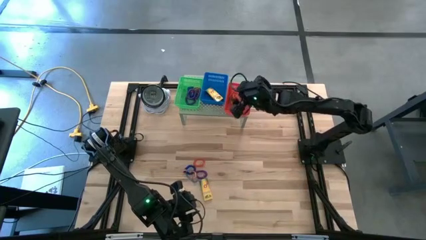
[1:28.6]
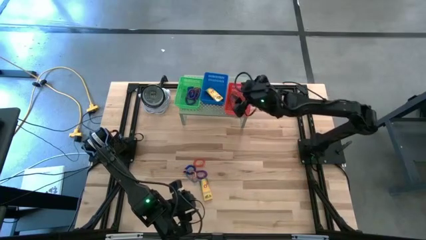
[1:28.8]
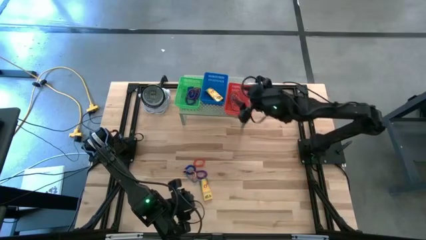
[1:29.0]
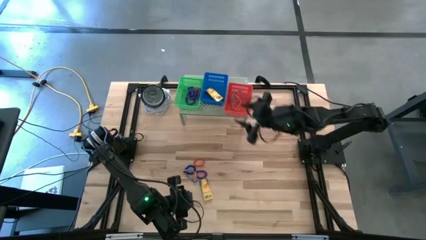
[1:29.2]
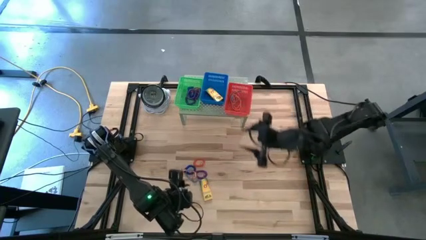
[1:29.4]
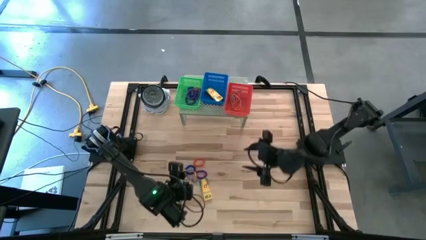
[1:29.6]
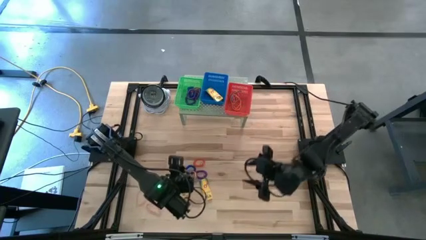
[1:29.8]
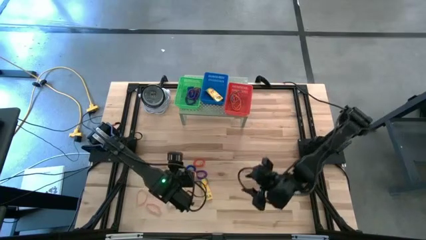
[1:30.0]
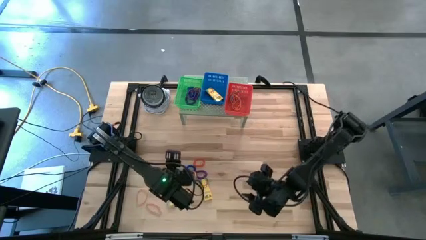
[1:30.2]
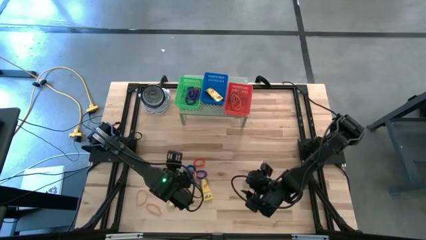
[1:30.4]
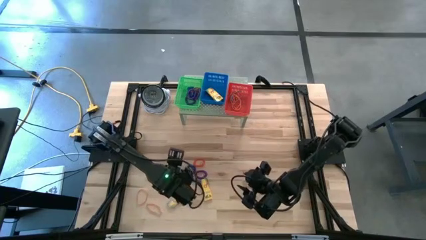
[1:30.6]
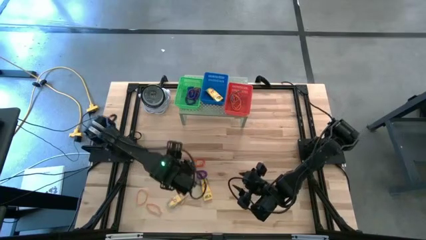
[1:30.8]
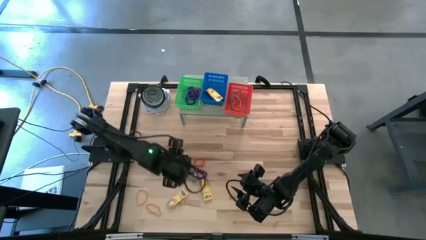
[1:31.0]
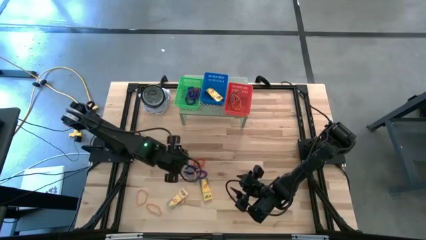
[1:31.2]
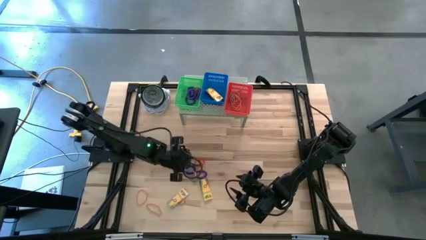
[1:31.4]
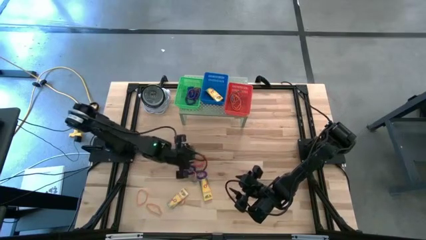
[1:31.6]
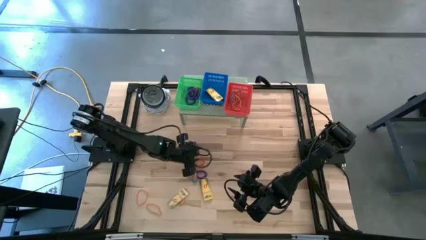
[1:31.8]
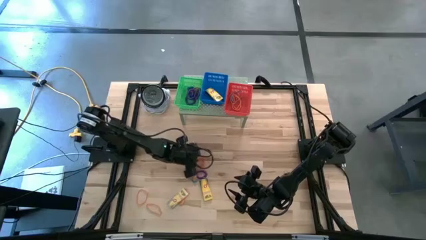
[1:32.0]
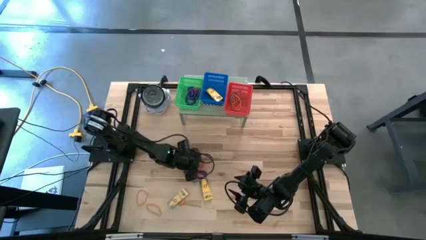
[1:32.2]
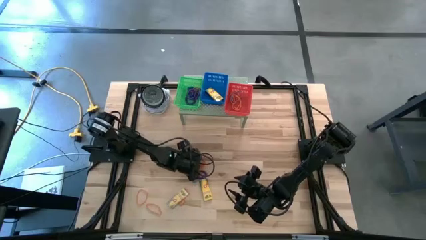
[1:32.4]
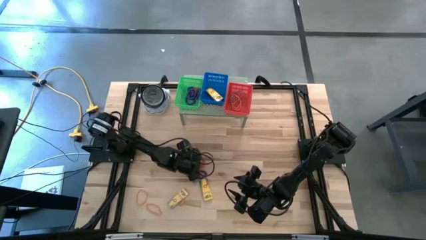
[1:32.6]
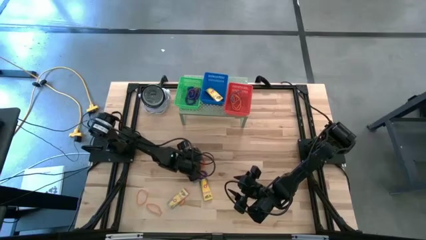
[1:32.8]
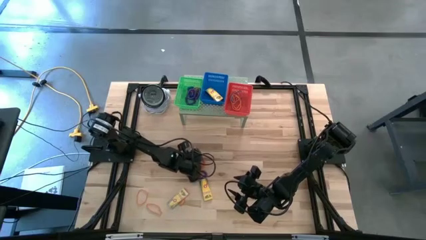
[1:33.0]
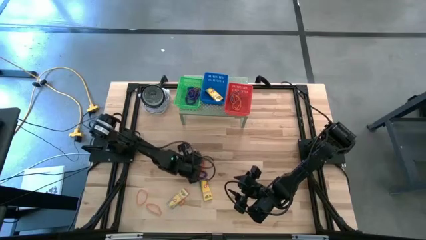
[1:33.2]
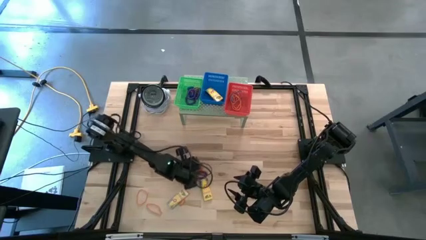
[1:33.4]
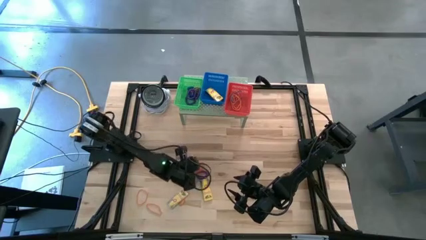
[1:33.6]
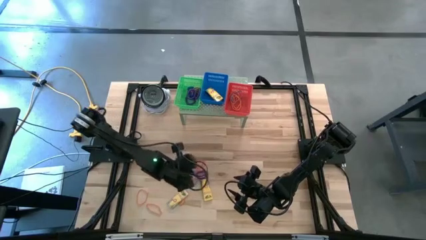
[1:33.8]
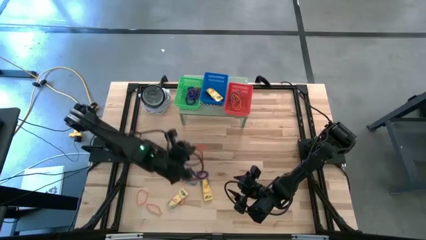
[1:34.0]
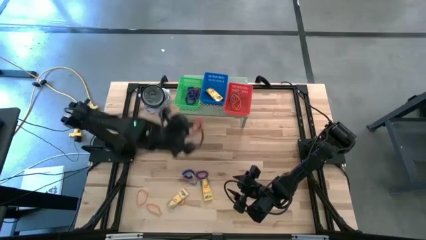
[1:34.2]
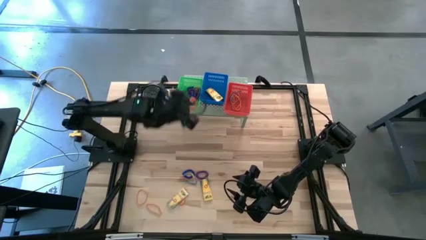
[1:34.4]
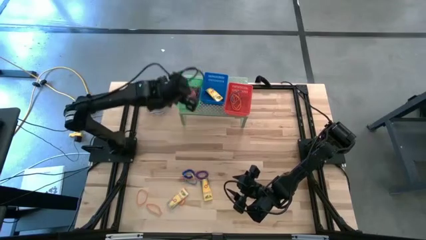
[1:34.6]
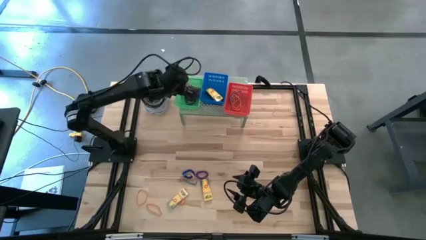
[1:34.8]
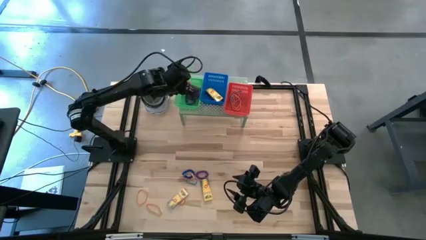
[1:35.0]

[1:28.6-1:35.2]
Task: Pick & Place Office Desk Supplies
Put the orange spring keychain into the green bin on the shelf

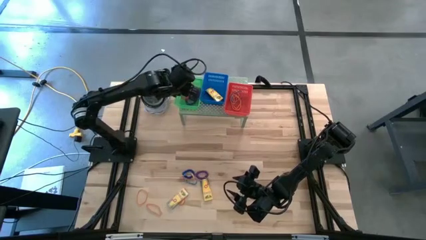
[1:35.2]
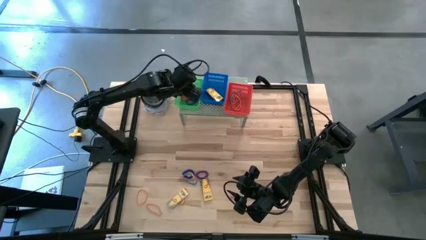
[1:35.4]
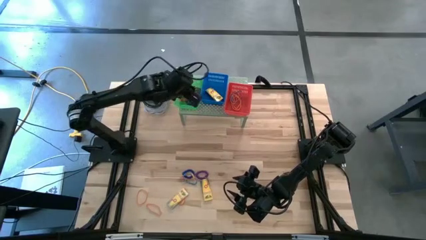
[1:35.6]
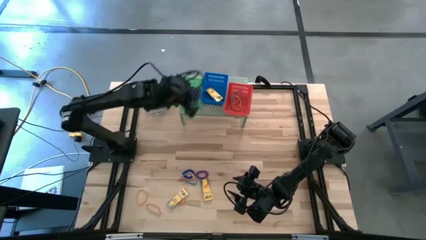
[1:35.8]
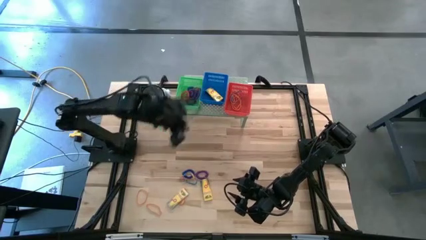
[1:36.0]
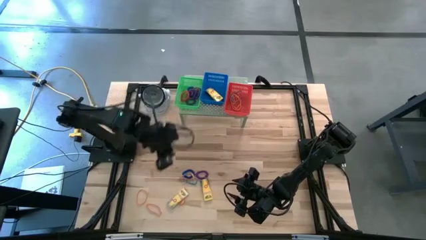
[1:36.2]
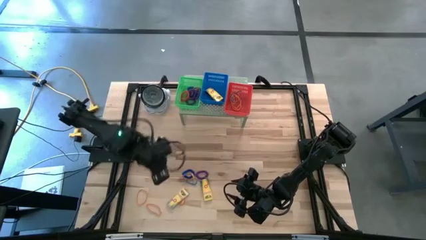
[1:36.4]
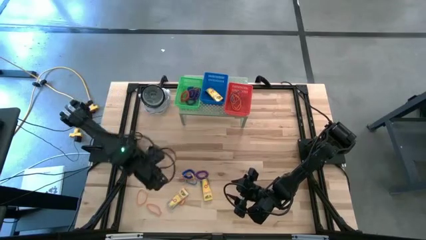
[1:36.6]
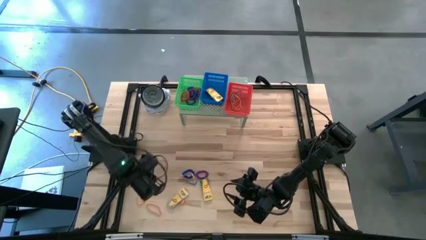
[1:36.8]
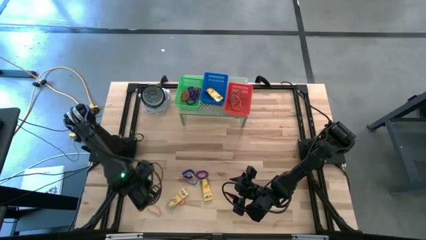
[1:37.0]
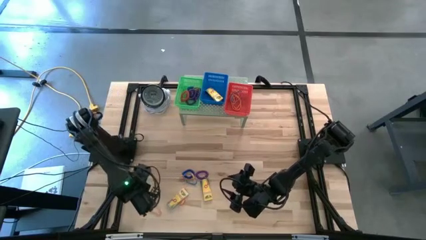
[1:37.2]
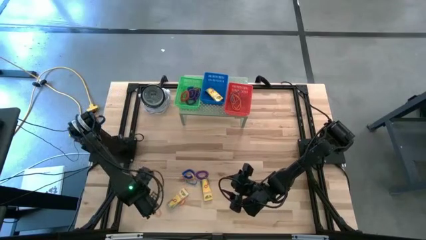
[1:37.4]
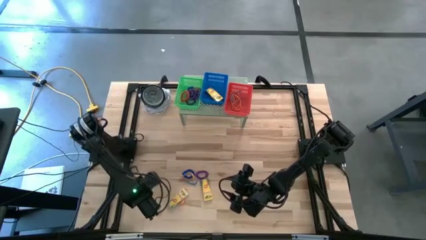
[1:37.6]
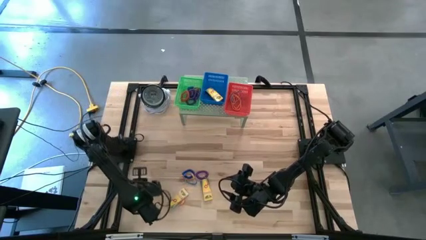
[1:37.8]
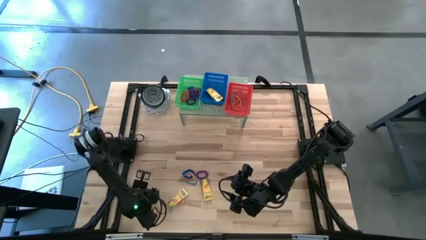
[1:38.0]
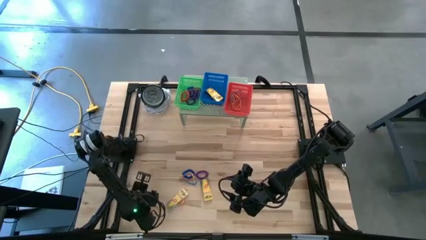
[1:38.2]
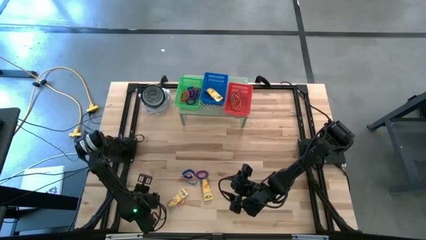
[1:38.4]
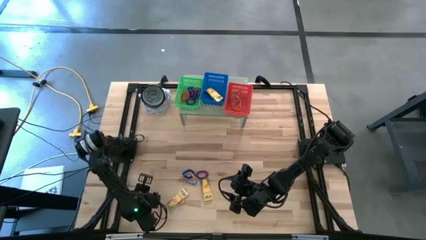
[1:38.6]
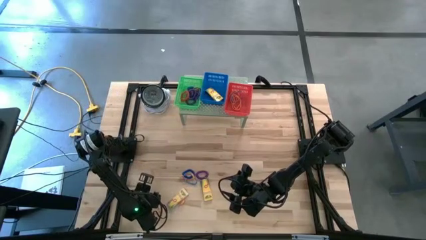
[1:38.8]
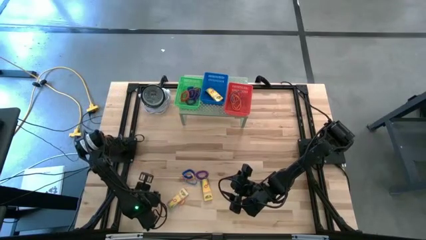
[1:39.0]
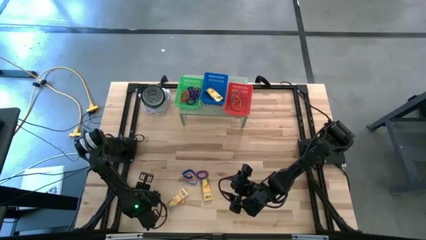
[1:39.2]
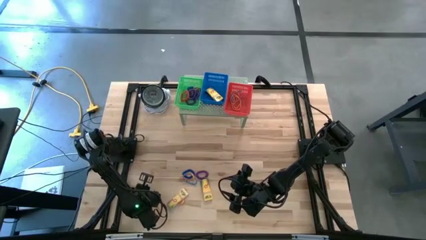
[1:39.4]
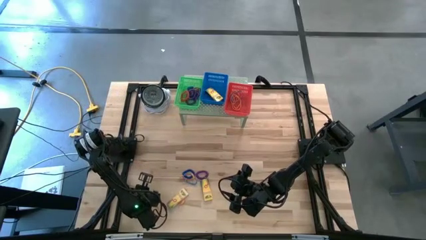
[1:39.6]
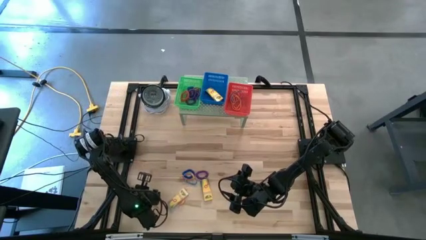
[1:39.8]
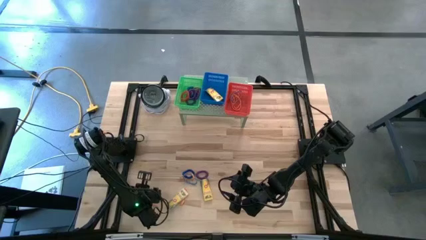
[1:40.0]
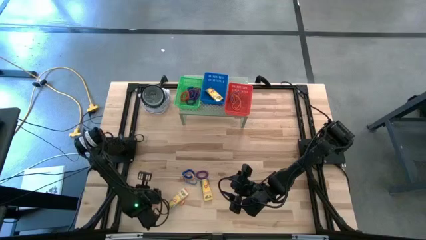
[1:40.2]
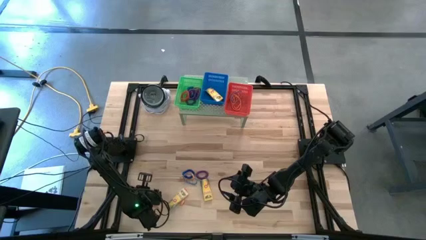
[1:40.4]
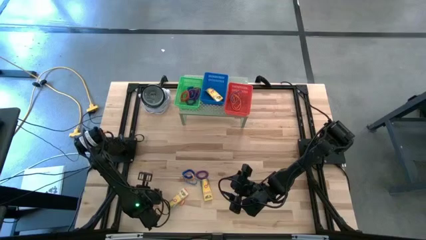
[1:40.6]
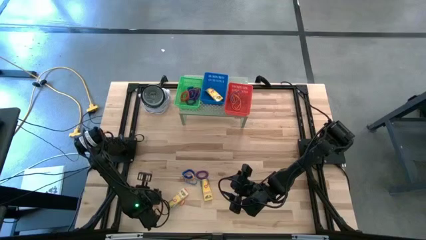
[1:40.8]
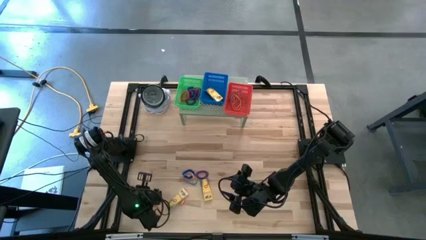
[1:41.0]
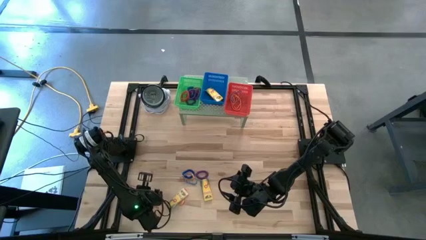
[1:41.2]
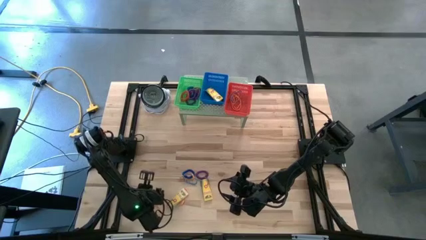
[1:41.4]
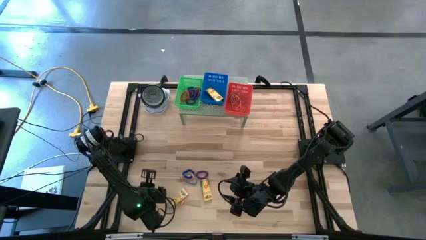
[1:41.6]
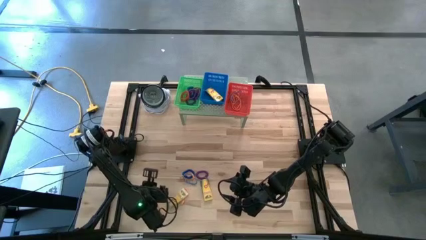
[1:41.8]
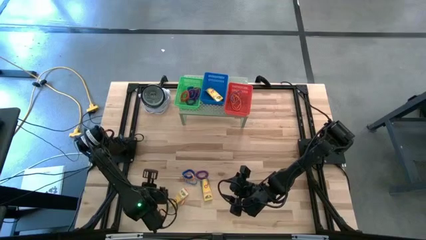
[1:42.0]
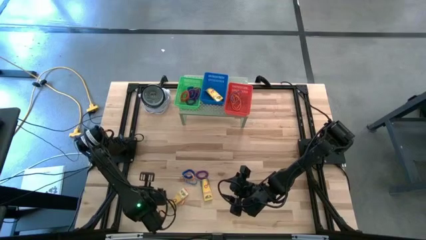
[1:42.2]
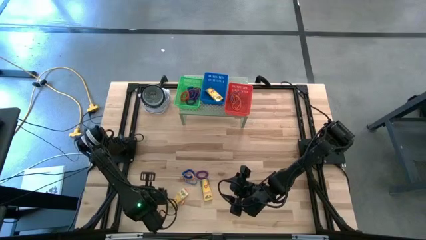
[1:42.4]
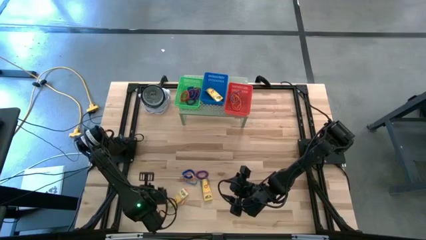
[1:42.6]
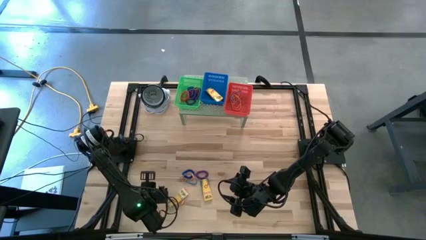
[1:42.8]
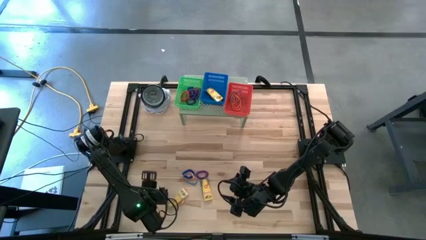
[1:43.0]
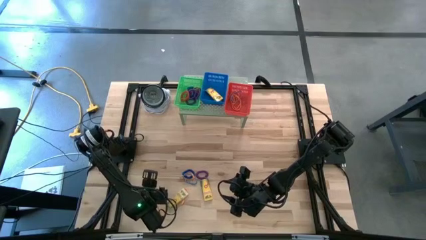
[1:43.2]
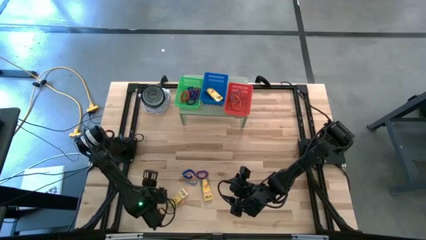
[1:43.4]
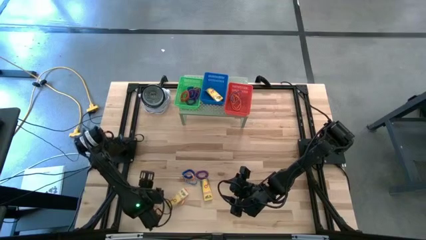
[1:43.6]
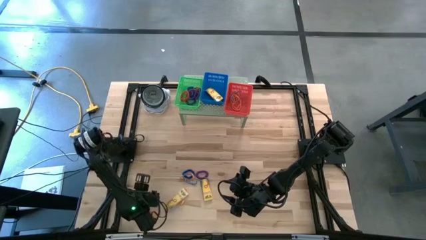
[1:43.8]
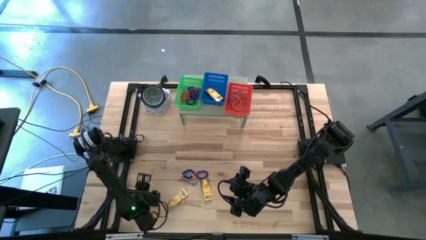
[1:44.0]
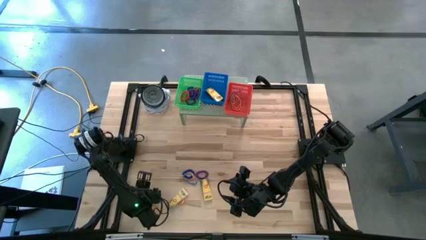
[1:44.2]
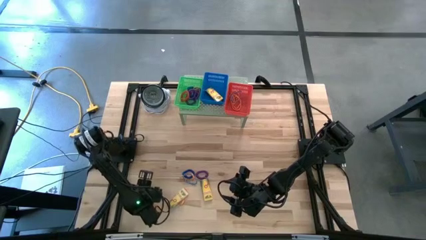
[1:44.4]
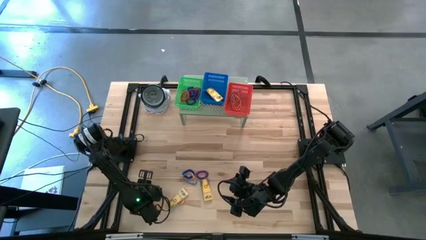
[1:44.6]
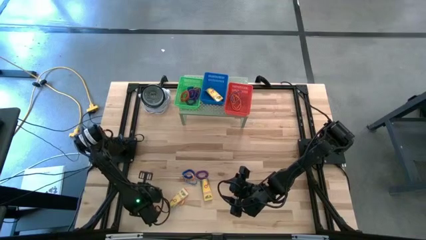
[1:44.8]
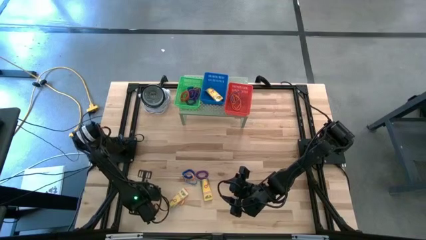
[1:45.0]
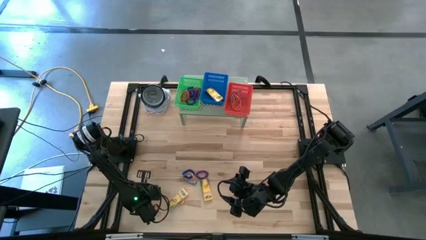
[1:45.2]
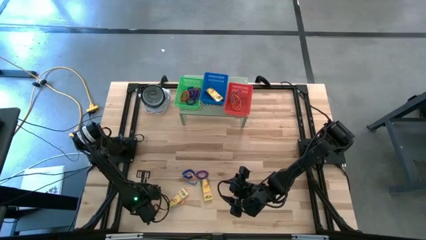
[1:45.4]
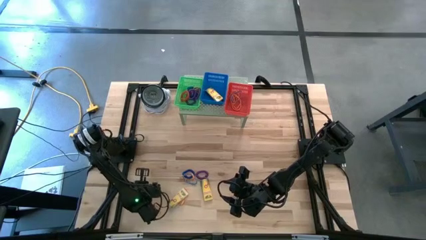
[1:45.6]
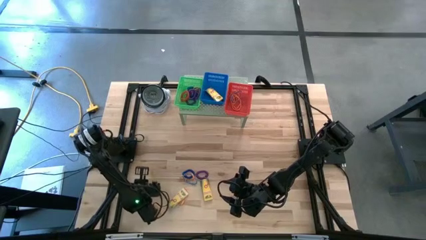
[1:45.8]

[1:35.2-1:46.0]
Put the orange rubber band into the red bin on the shelf
